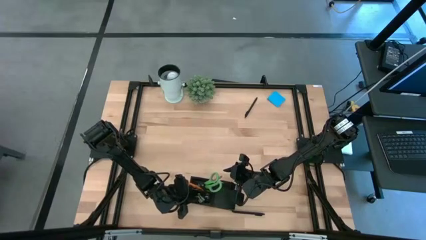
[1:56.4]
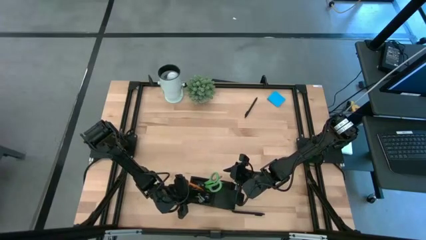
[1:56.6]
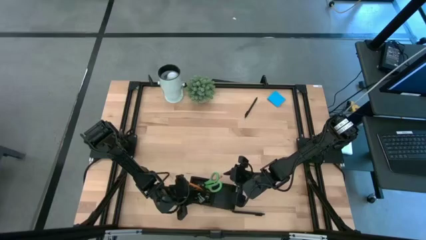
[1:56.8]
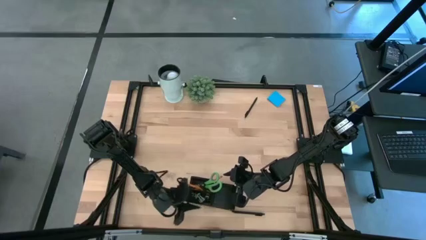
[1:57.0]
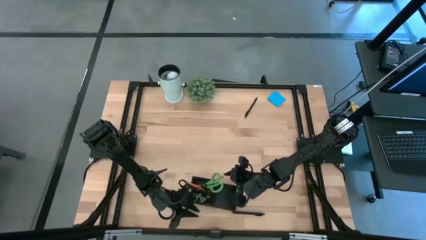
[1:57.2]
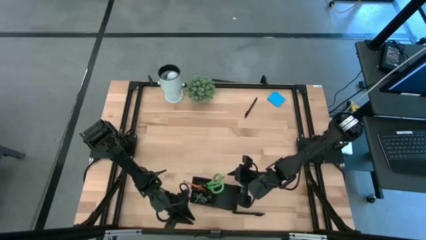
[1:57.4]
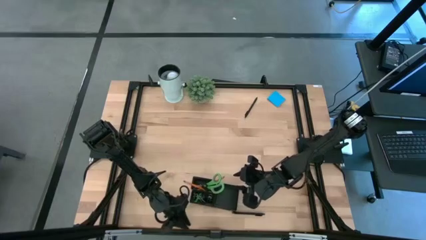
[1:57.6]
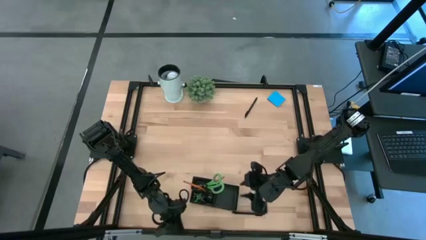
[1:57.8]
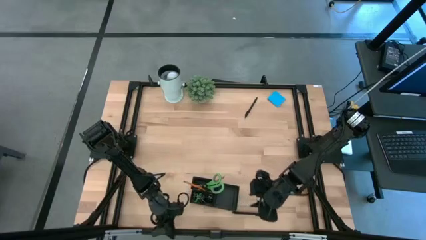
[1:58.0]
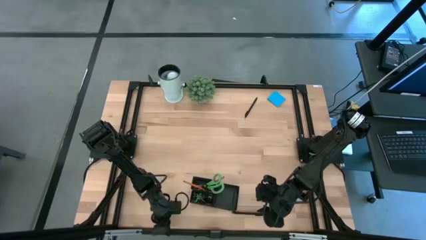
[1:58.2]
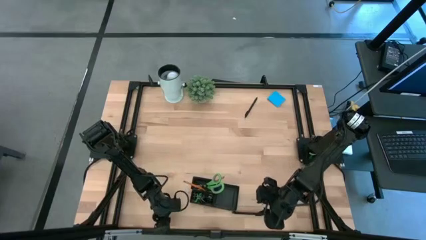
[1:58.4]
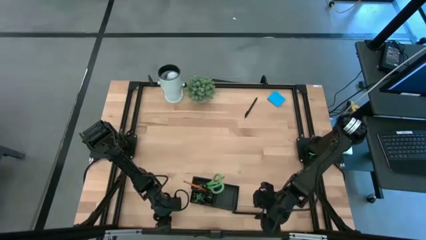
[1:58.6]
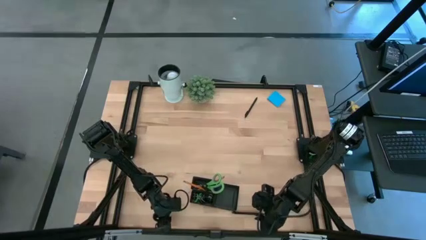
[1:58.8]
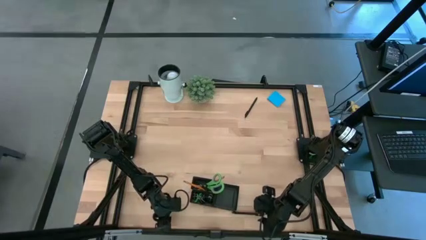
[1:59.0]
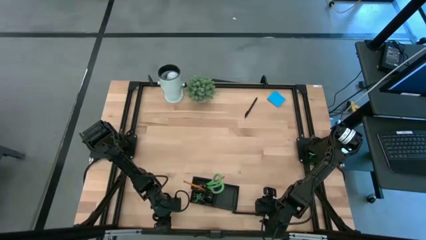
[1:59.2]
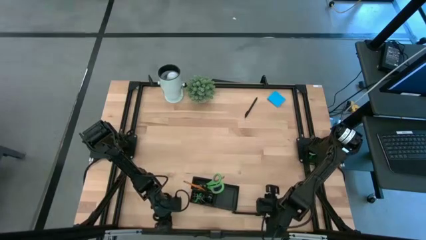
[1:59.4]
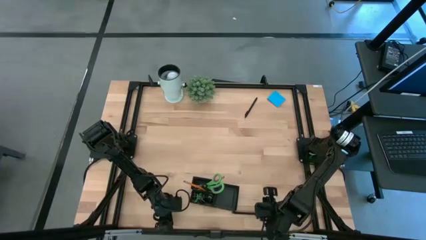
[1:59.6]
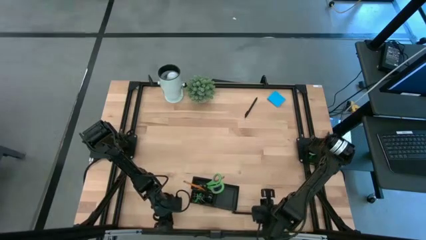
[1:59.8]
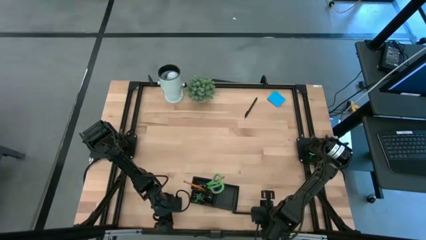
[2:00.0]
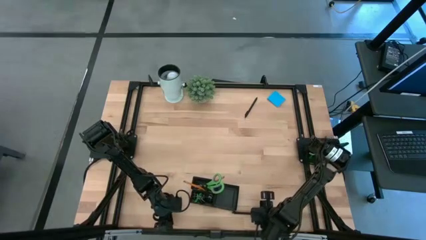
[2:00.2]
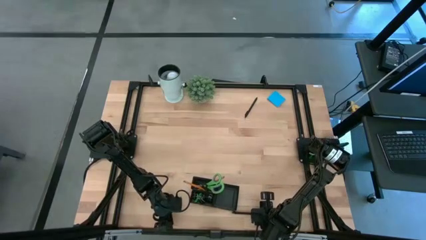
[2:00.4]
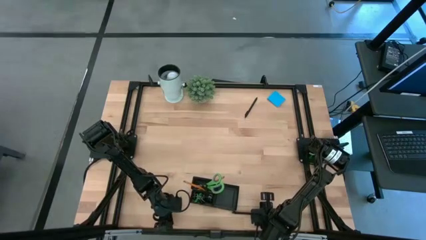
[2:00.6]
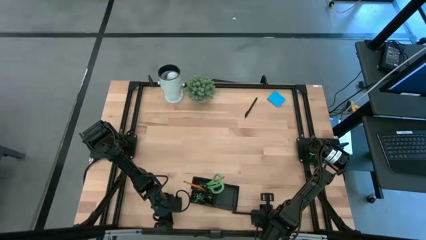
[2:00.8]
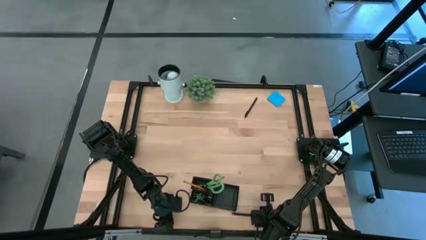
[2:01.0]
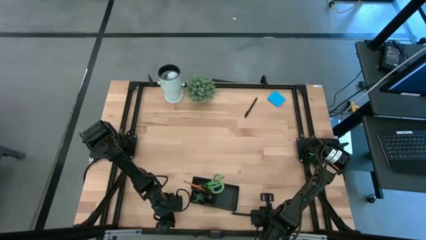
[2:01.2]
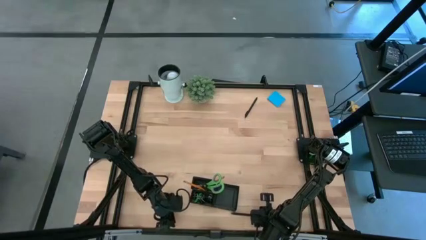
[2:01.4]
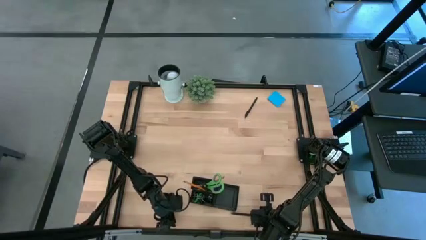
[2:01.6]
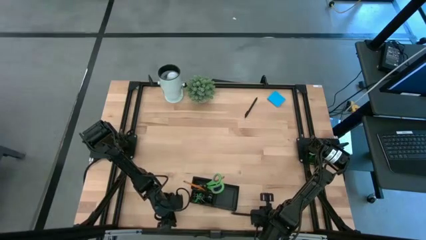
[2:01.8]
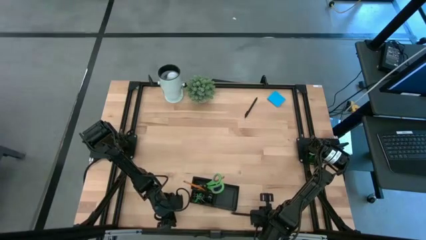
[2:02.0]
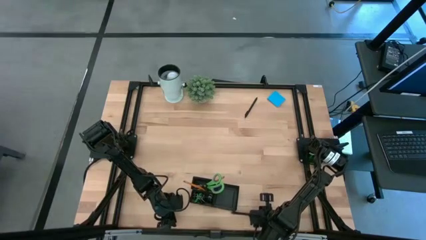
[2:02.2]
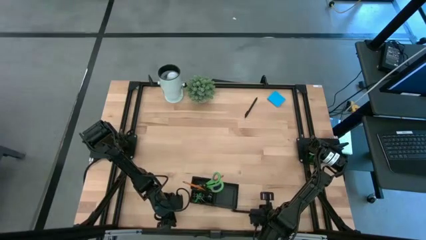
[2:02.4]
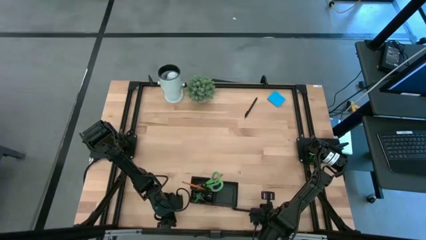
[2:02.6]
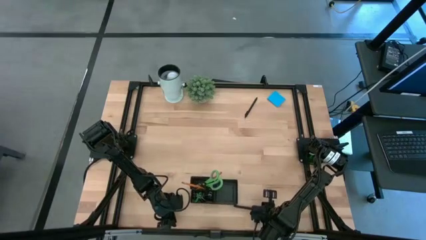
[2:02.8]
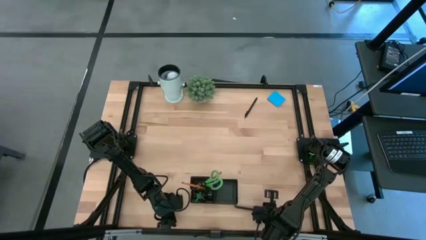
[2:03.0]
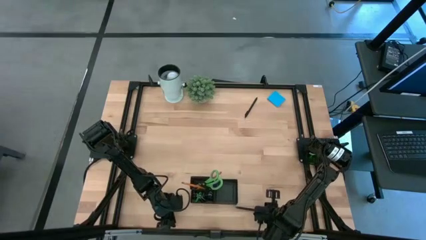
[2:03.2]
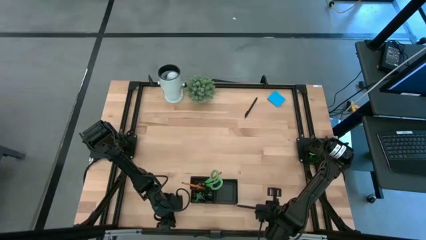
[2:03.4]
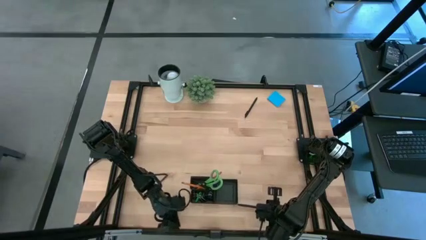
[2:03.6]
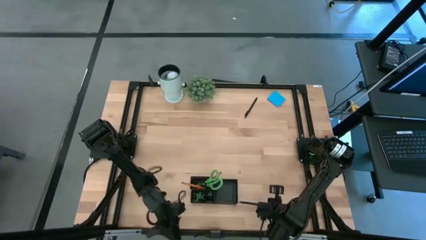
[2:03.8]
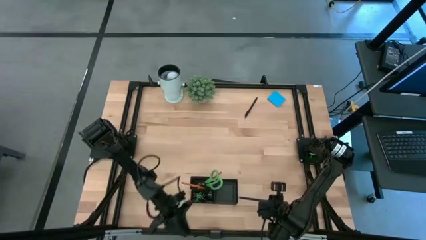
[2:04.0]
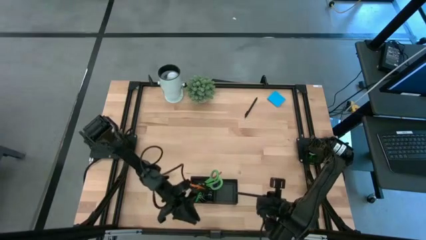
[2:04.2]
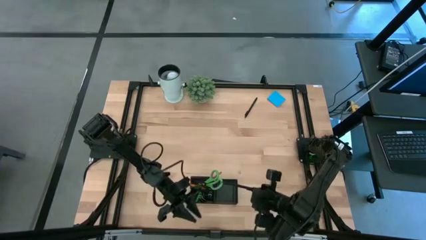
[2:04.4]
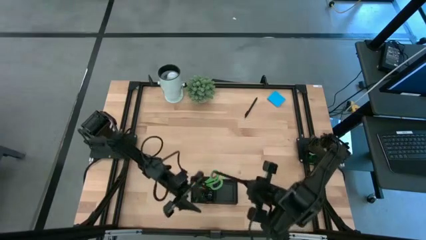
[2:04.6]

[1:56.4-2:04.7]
Task: Pick and place office supplies into organizer
Put the bottom black pen into the black desk organizer

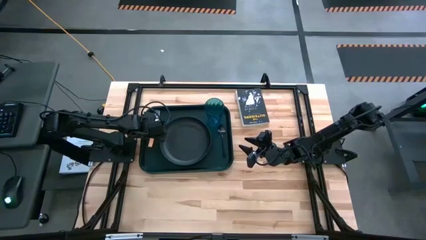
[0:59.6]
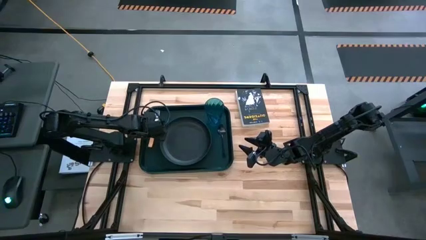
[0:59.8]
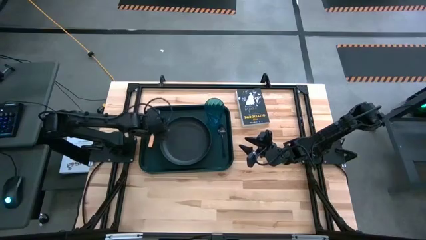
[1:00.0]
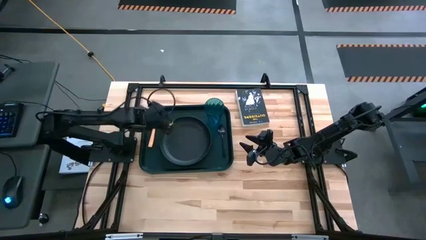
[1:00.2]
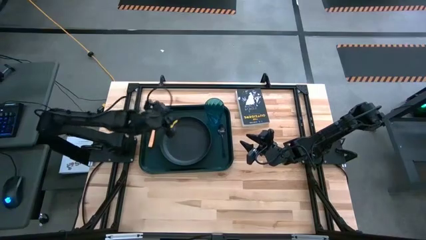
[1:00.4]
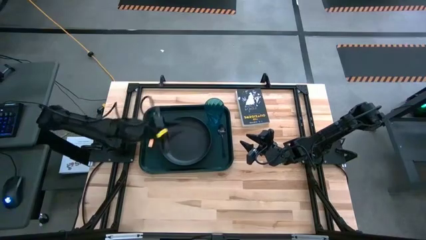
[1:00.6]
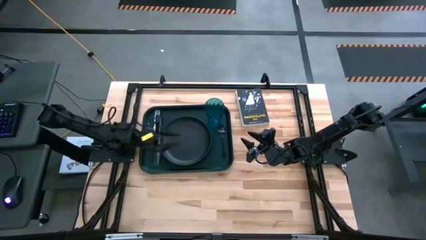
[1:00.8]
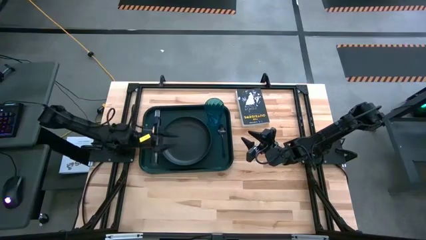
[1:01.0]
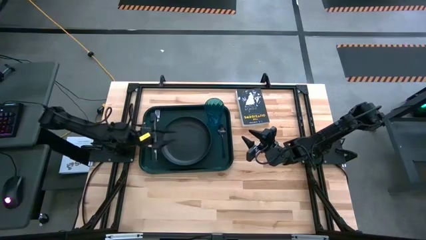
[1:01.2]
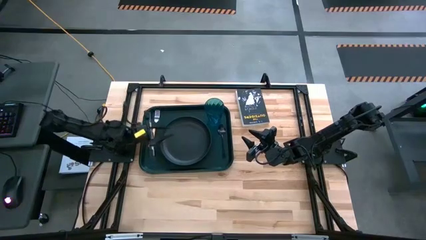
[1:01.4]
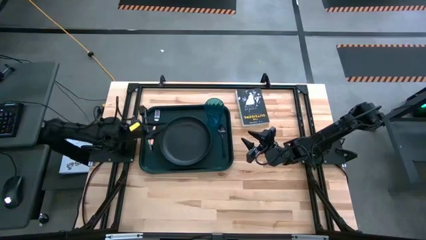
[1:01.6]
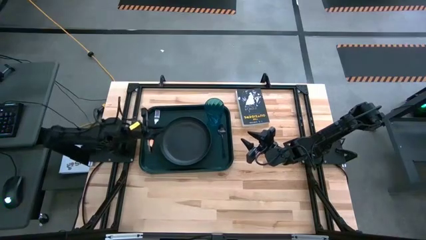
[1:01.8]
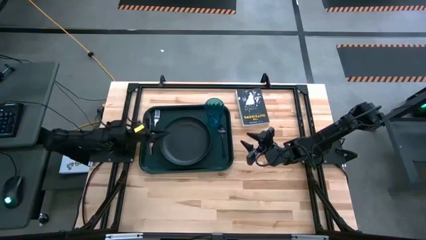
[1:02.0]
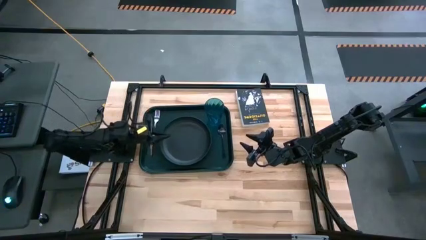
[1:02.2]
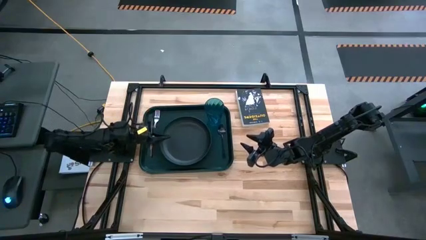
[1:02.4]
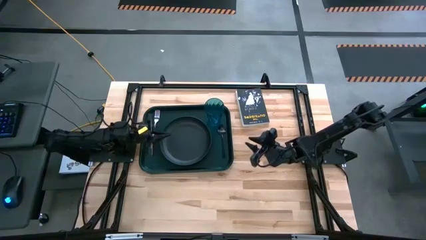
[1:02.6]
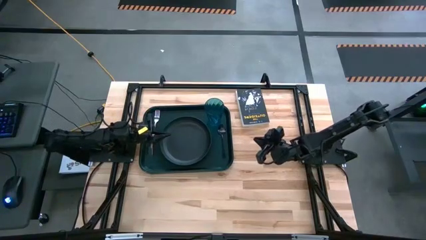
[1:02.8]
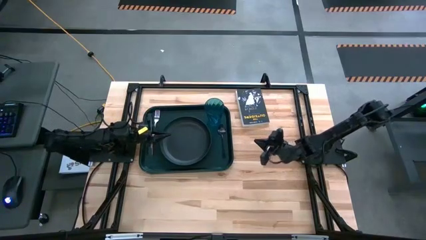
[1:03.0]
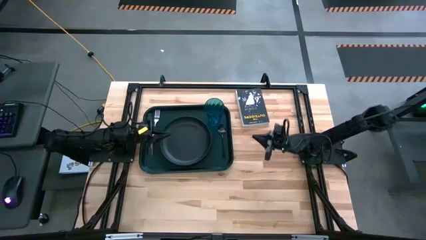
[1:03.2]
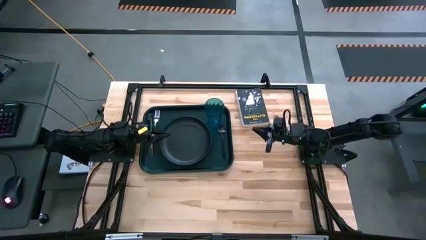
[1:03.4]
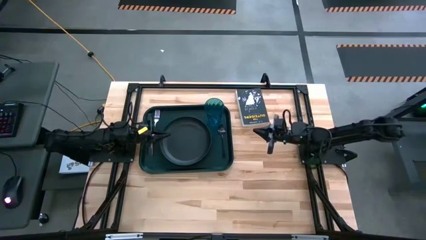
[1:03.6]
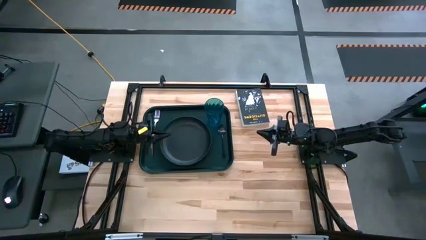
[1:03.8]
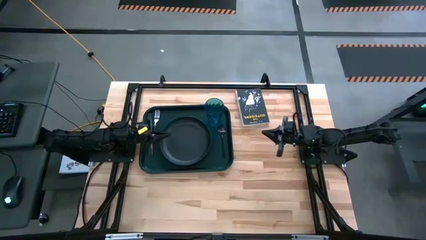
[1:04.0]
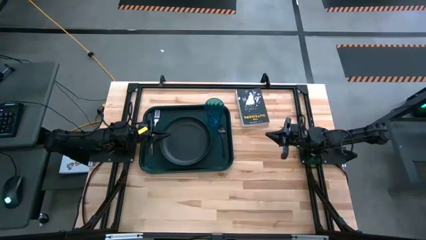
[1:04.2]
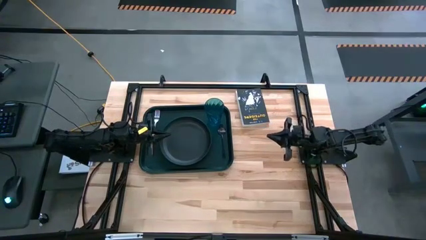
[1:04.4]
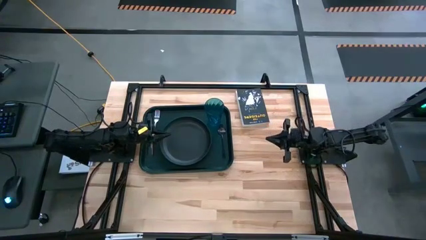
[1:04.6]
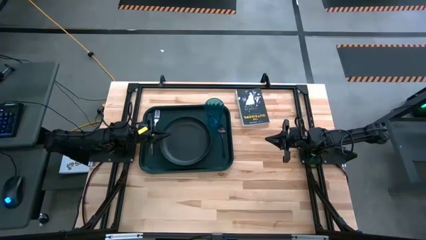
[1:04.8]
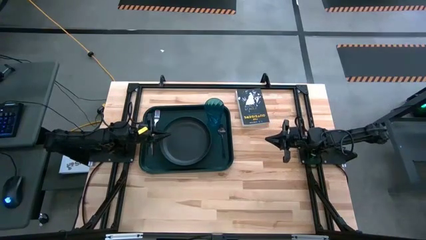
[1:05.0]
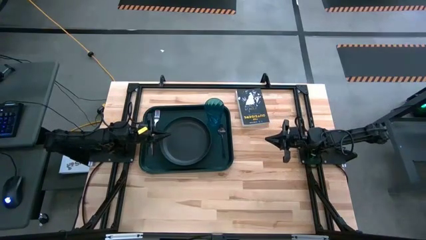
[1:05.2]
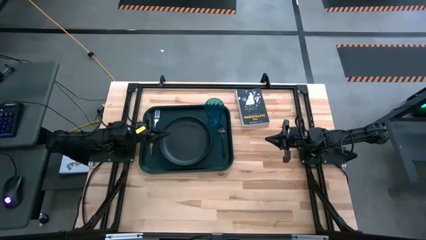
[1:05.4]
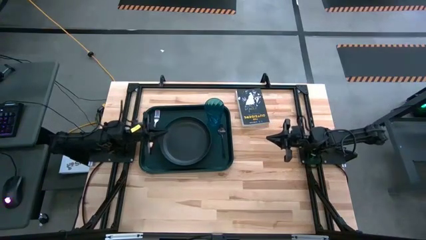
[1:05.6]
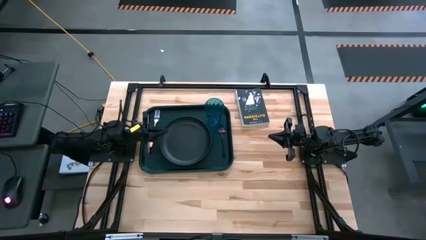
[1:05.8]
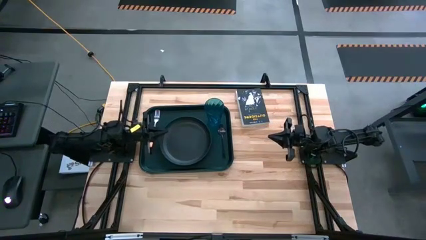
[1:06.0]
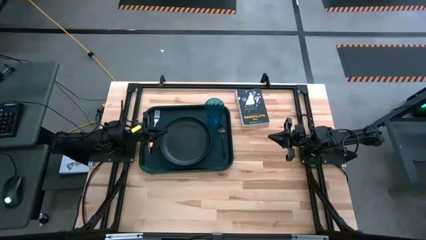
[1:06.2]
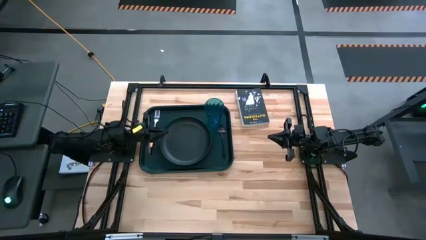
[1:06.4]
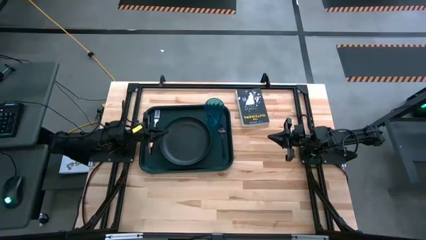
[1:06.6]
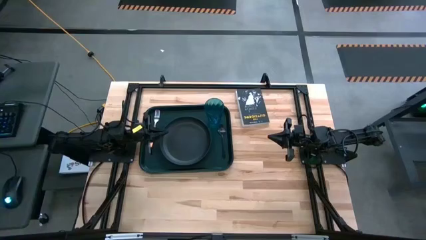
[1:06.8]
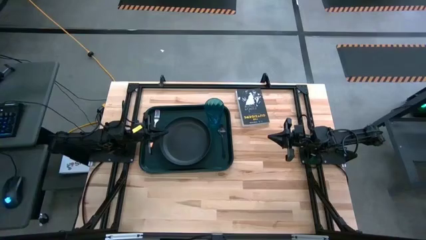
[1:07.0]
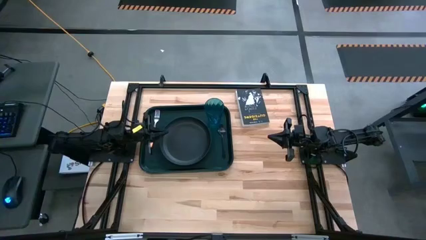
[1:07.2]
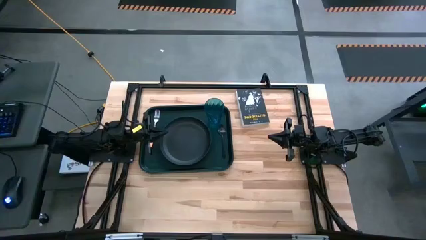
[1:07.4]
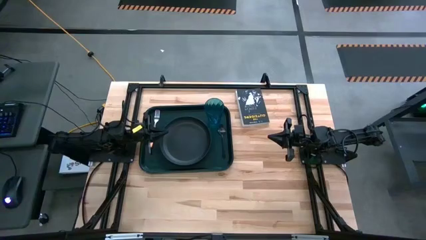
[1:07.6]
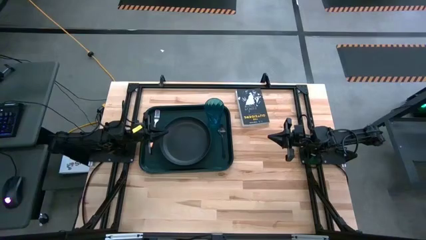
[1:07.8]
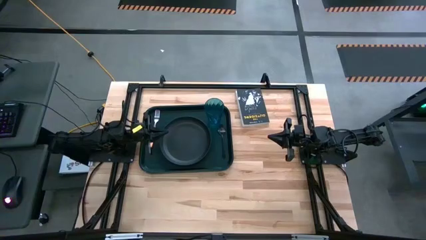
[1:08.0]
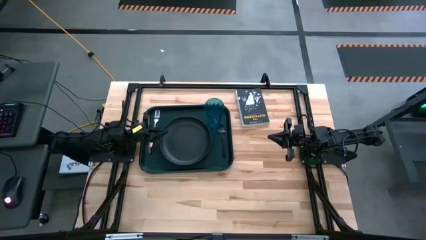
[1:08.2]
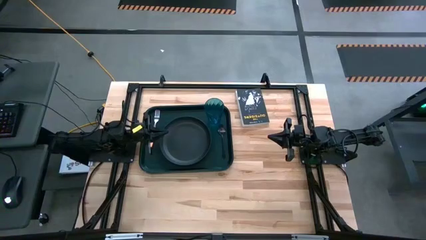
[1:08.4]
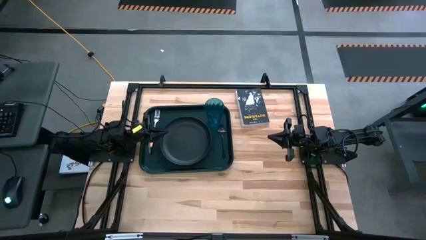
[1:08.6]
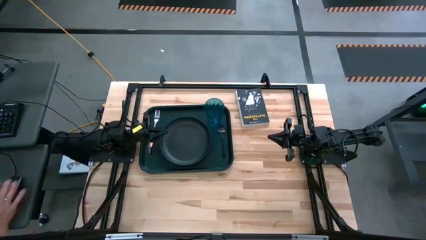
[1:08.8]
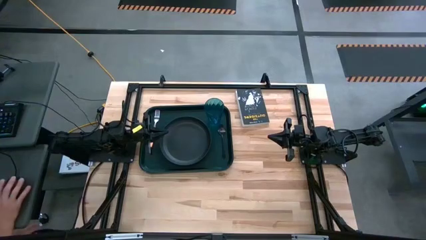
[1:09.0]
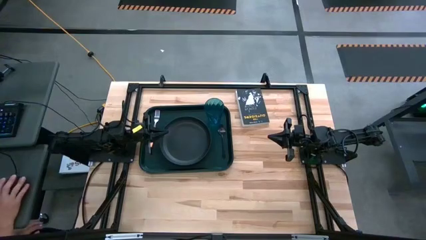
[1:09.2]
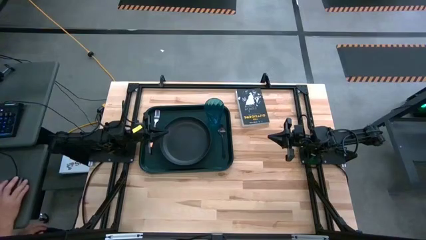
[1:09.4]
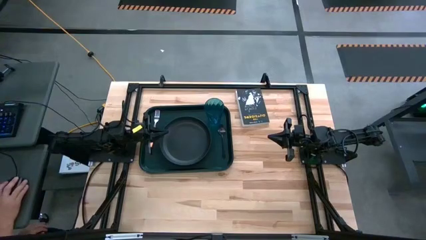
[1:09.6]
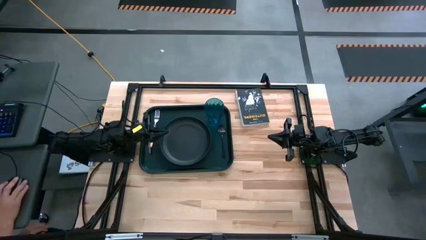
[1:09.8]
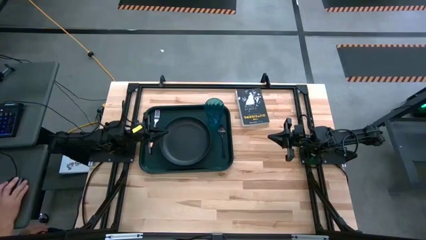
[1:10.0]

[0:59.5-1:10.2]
Task: Pick and place plate/cup/fork/spoon on tray
Return to Home Position
